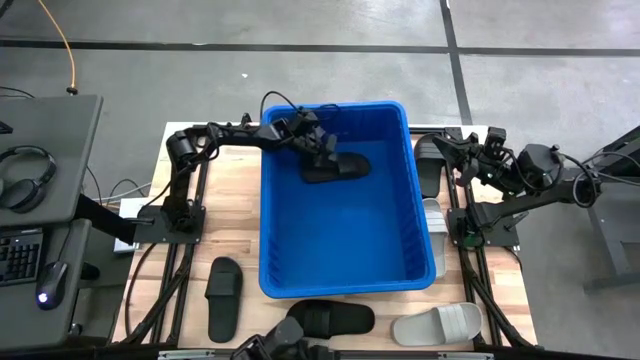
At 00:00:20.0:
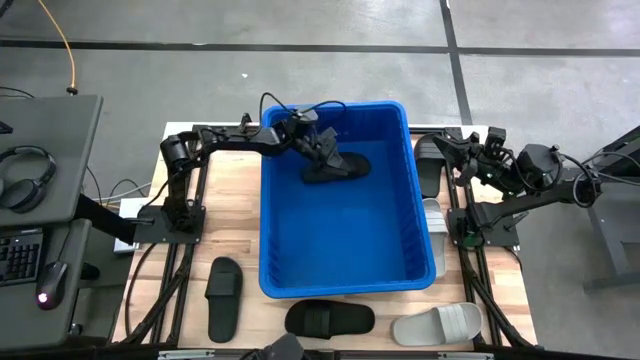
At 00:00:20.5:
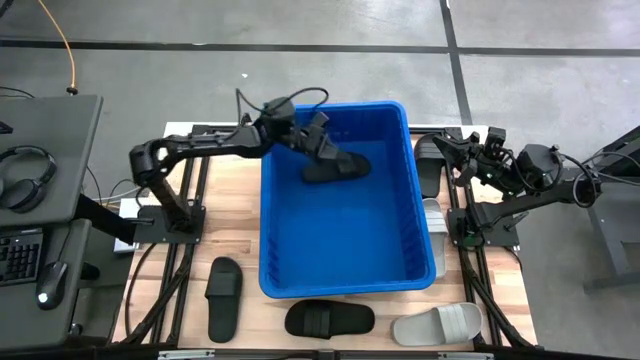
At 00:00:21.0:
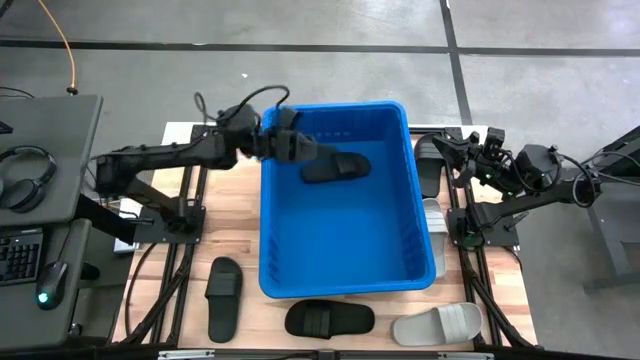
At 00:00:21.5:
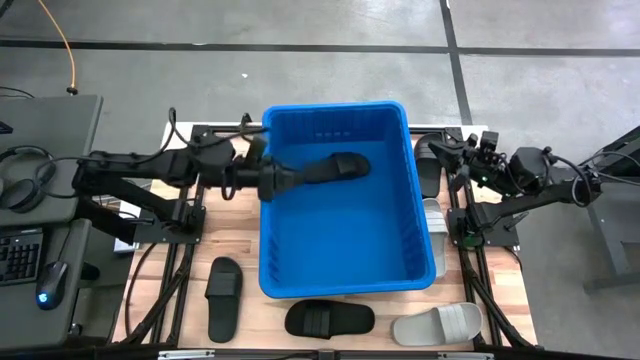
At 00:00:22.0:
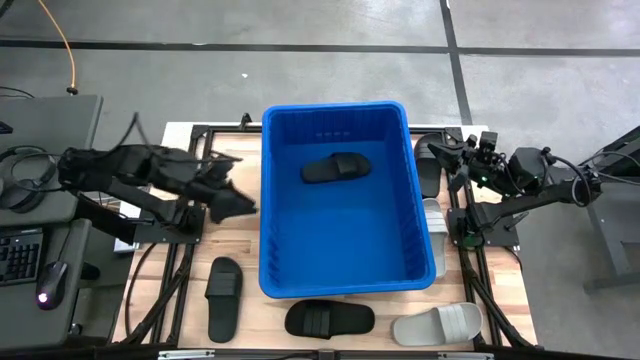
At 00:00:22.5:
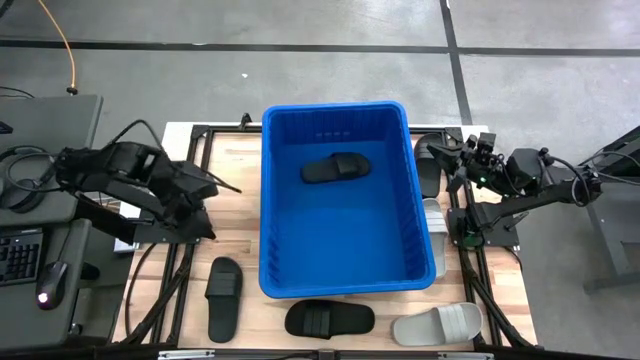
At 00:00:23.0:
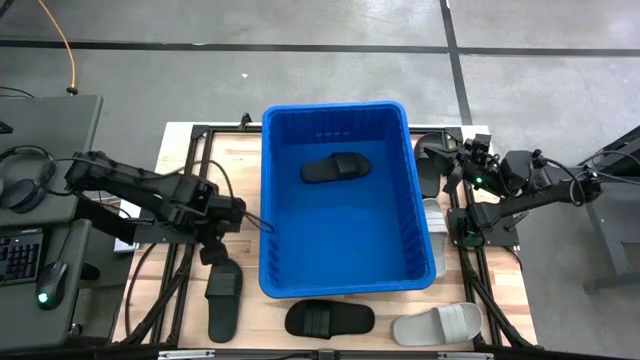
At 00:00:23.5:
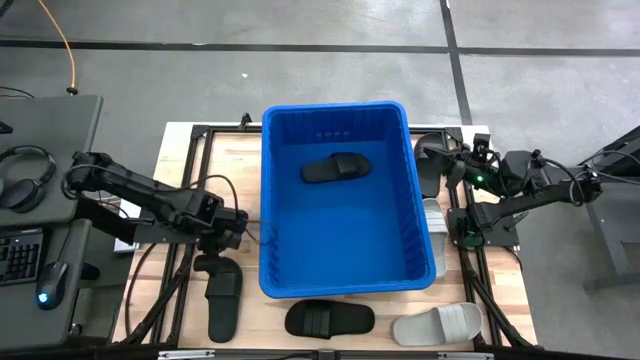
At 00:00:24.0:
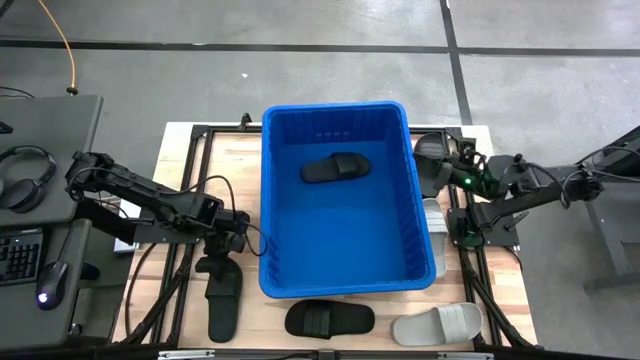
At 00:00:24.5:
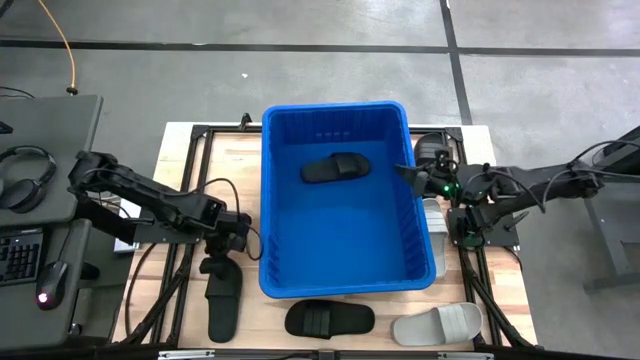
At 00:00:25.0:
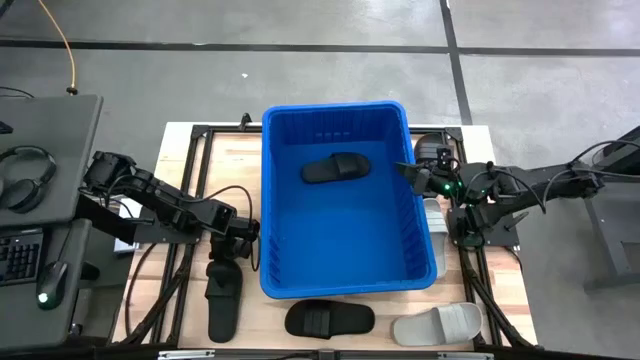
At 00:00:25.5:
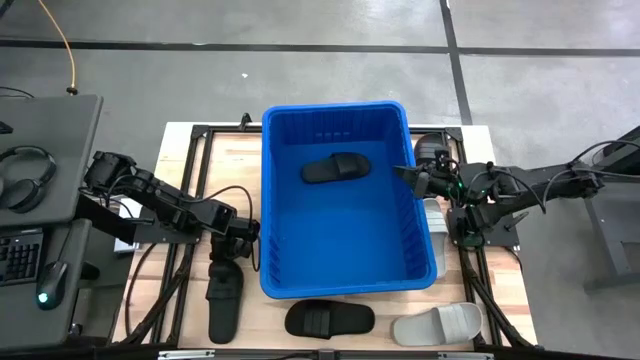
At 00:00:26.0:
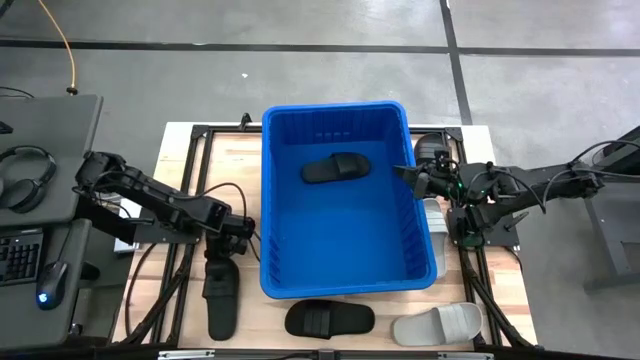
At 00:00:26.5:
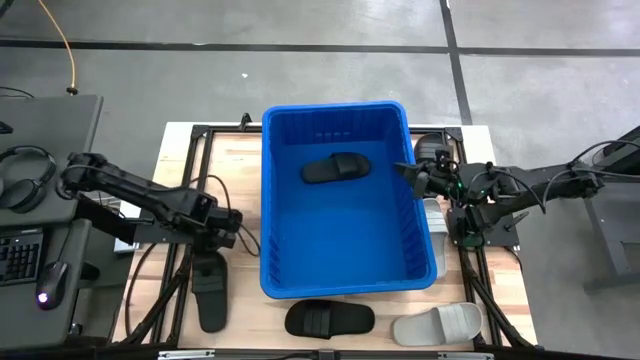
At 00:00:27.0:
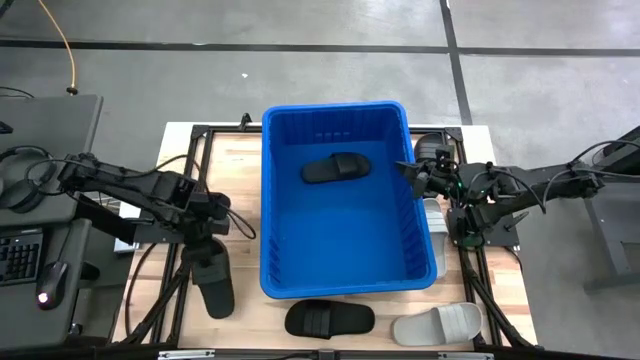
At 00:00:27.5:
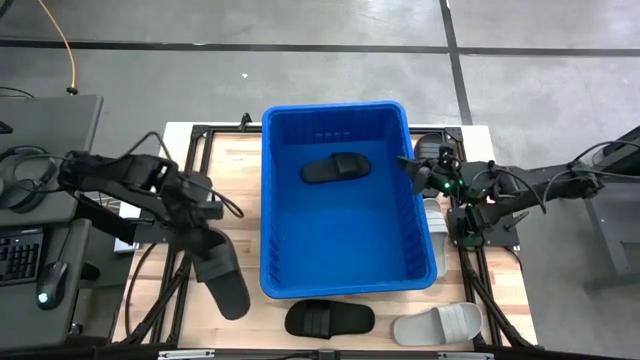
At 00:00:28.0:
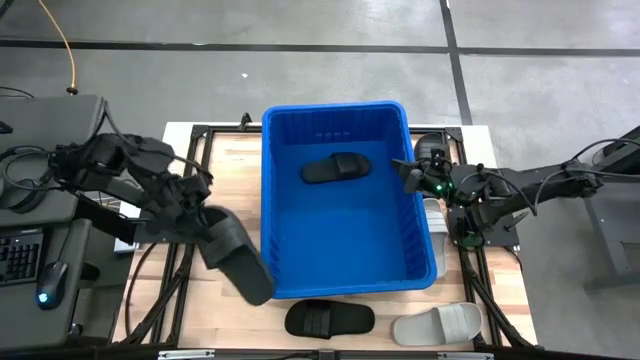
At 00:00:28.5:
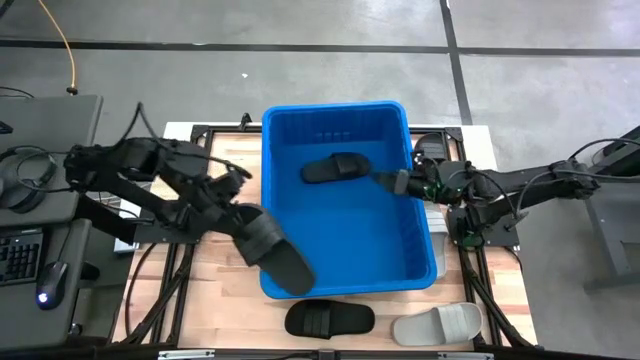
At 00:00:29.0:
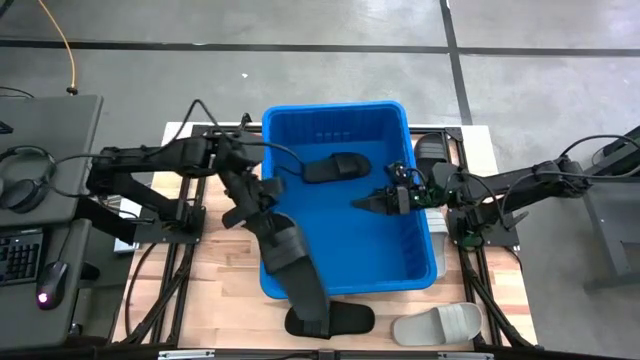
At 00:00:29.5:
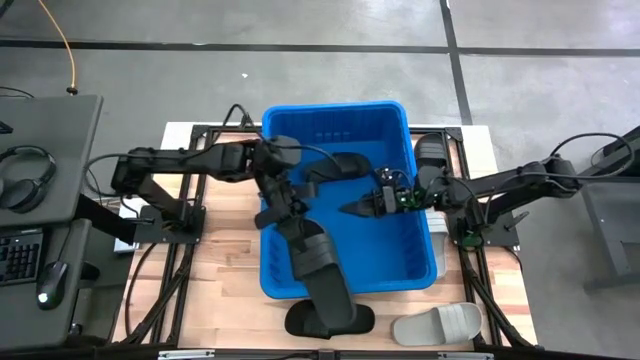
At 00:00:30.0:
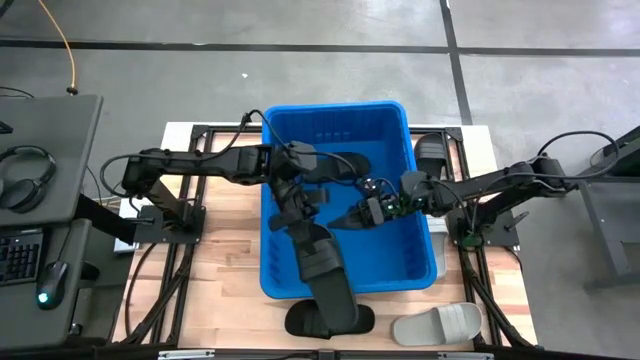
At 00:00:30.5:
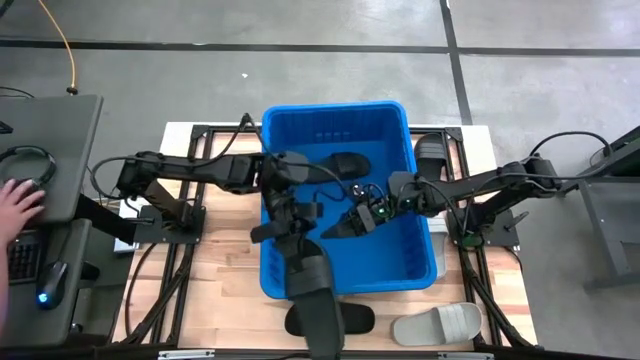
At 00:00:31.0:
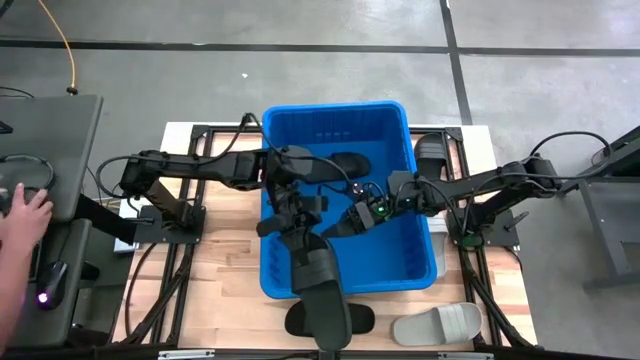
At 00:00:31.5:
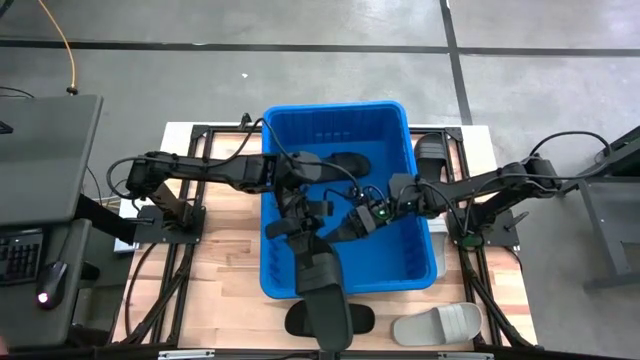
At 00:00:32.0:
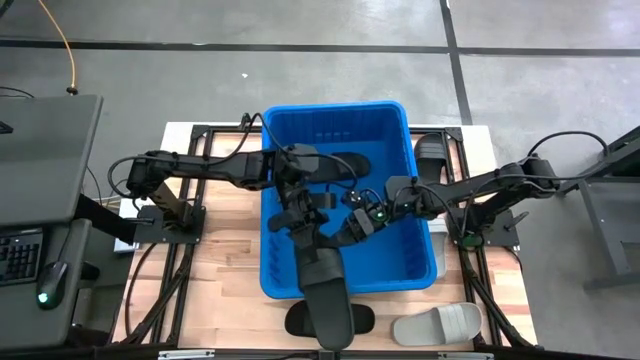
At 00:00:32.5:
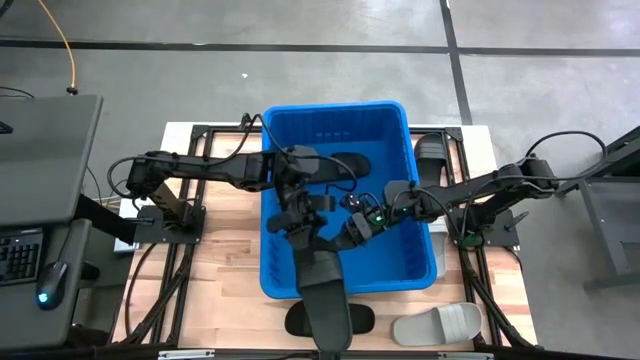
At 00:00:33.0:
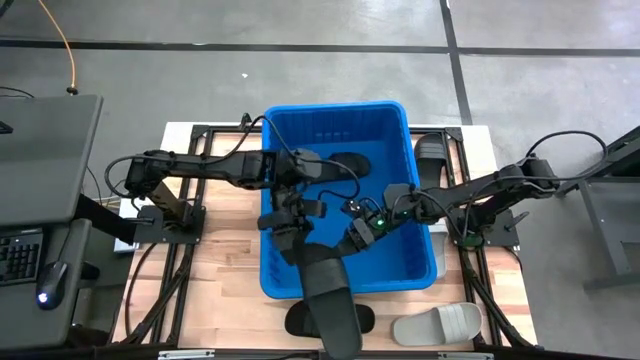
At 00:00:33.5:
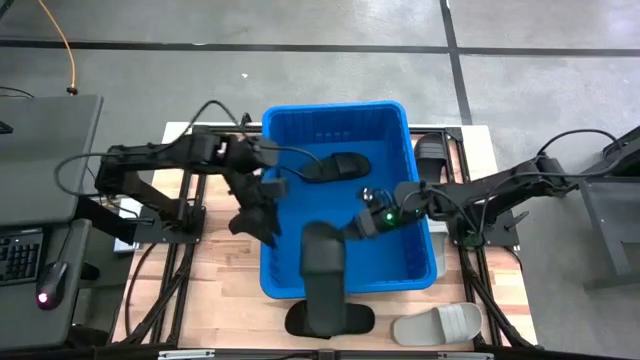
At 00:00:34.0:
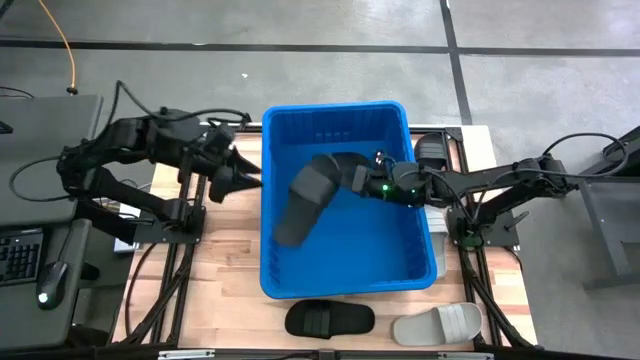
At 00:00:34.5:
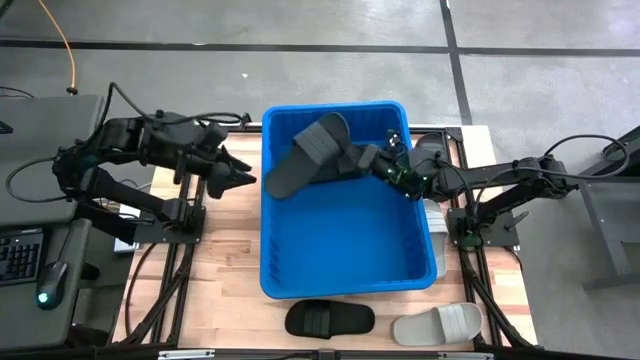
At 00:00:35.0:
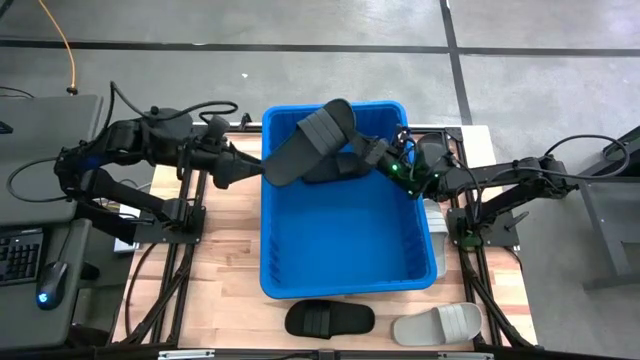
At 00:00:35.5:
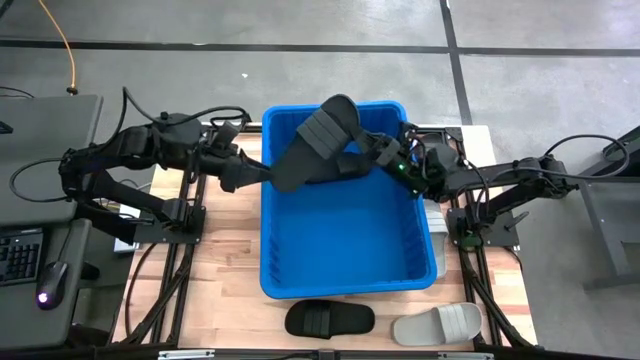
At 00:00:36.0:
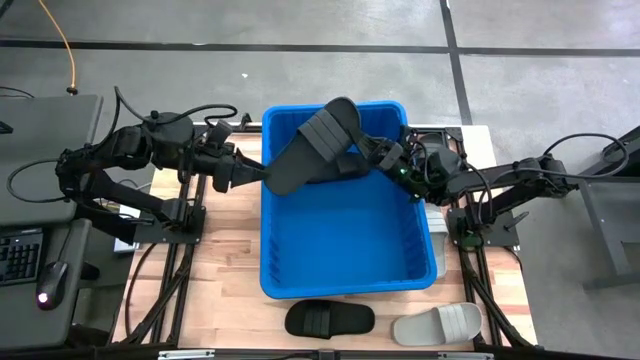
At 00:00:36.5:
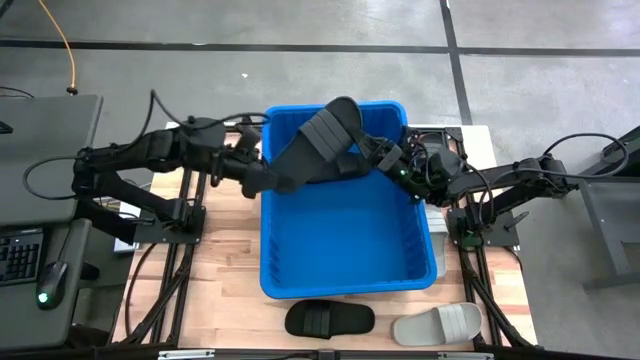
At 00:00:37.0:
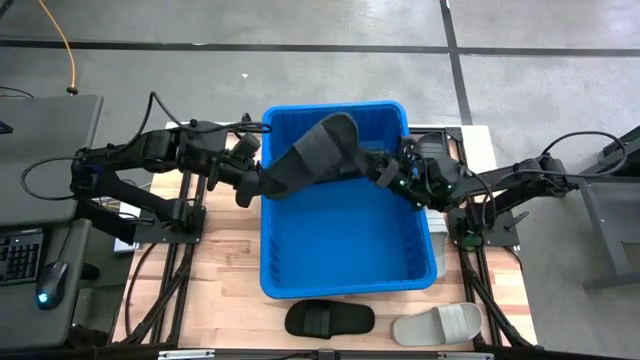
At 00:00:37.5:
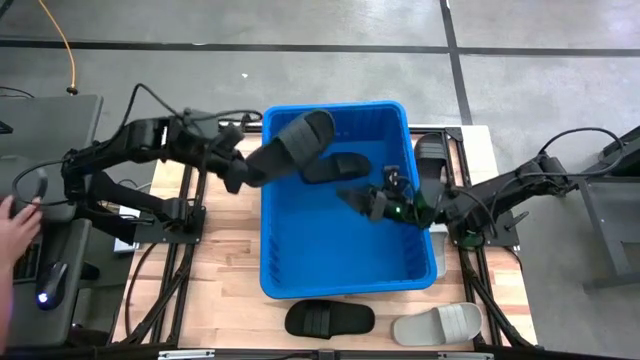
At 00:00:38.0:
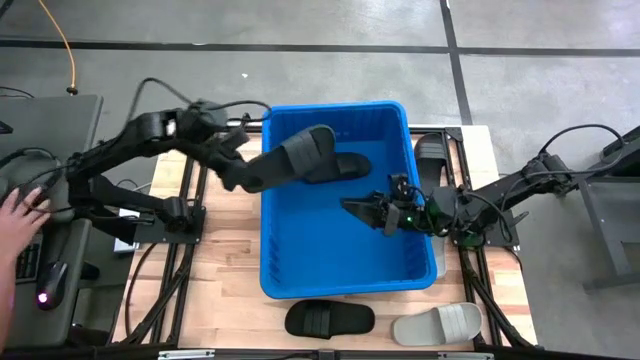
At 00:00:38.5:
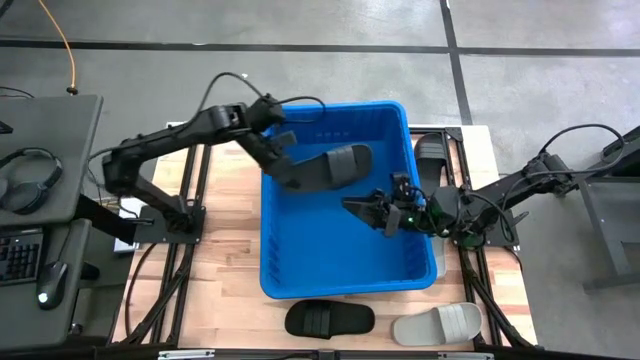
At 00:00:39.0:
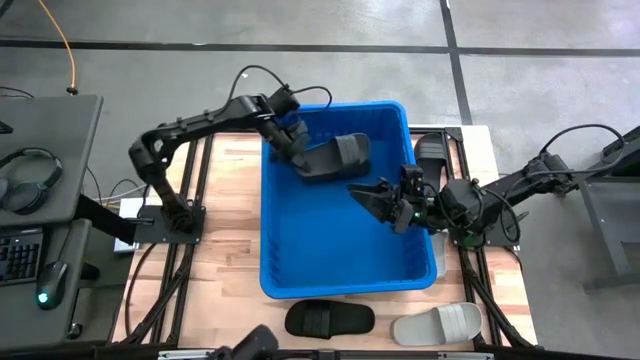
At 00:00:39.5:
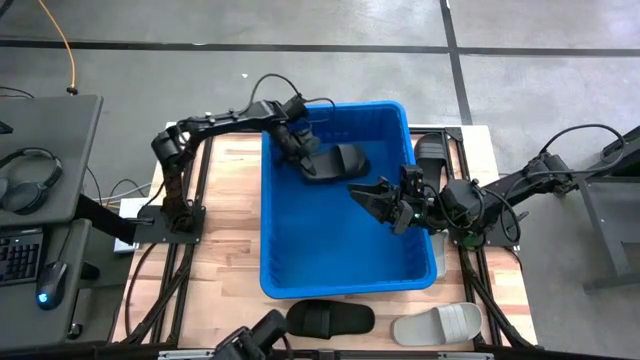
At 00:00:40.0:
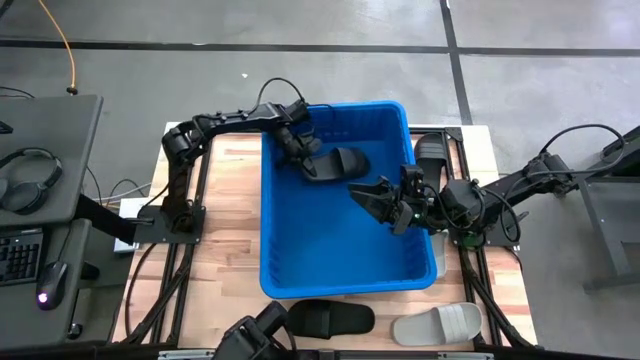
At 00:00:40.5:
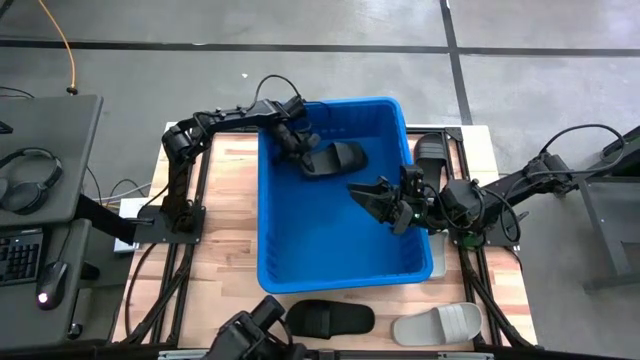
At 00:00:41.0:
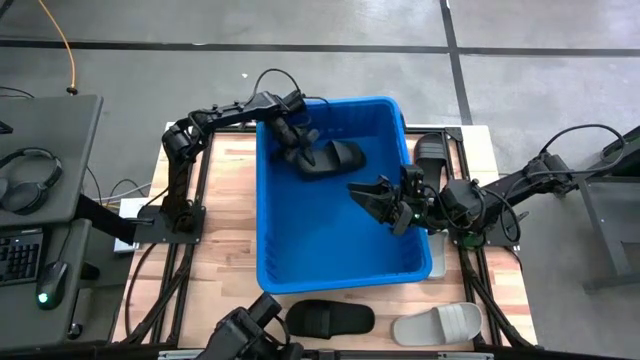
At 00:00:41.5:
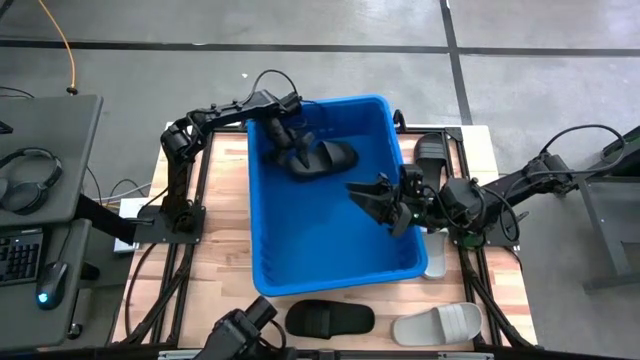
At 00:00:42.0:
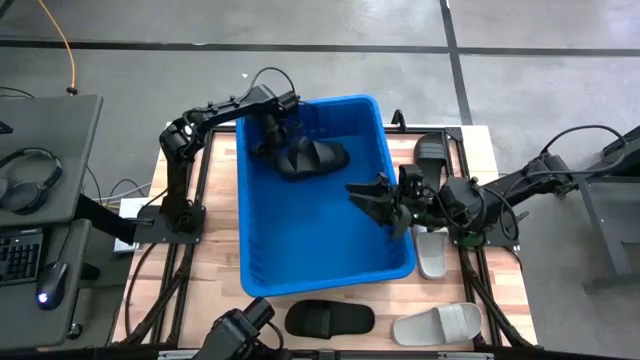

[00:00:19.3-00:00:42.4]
Task: Pick and place slides into bin
Put the black slide into the blue container
